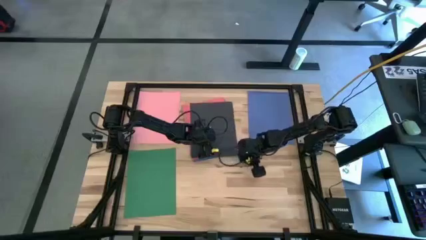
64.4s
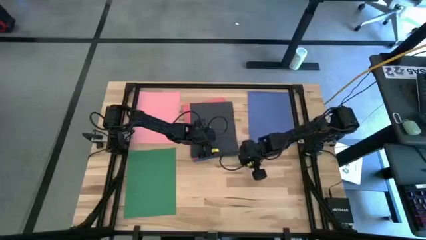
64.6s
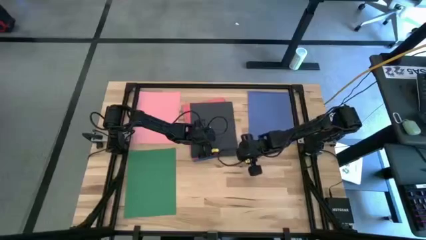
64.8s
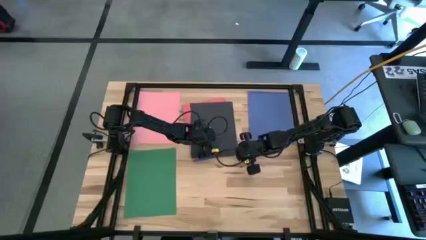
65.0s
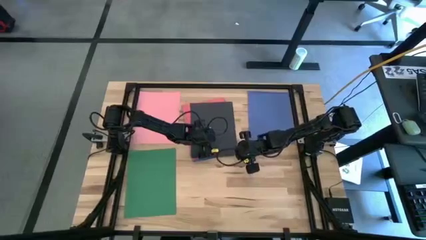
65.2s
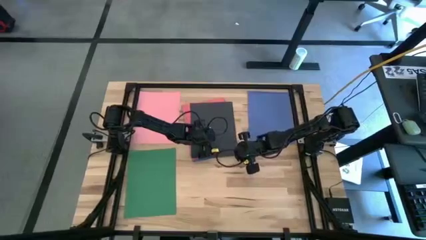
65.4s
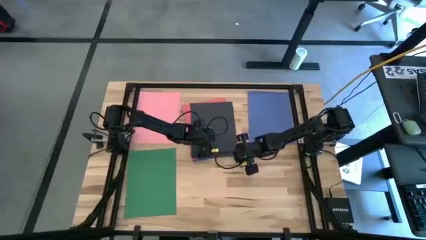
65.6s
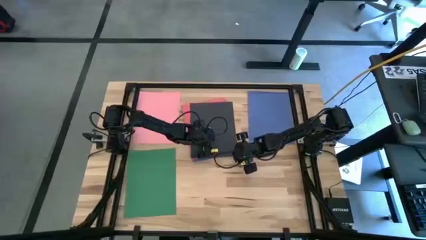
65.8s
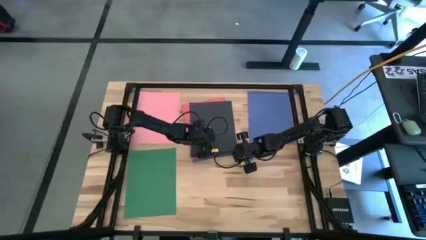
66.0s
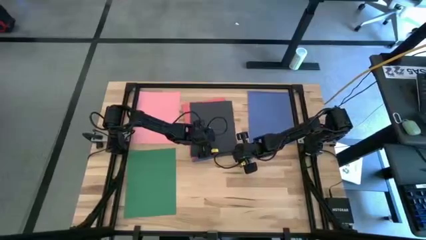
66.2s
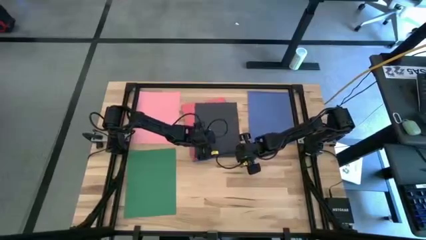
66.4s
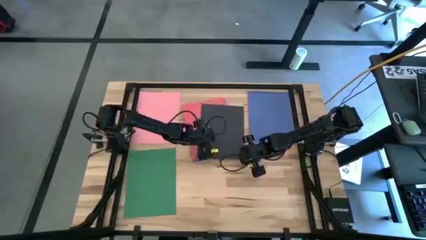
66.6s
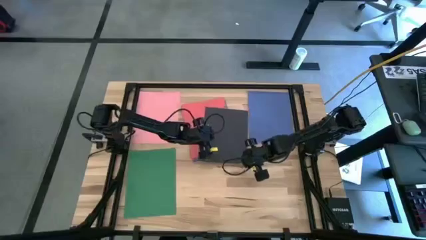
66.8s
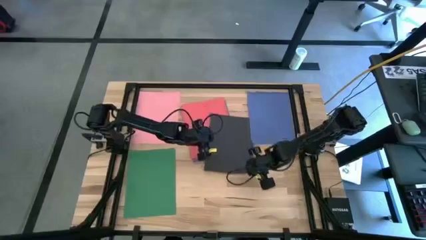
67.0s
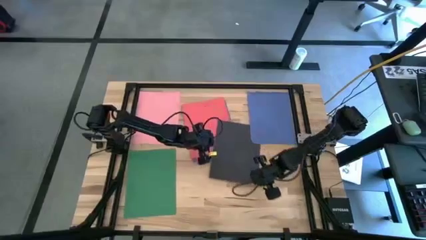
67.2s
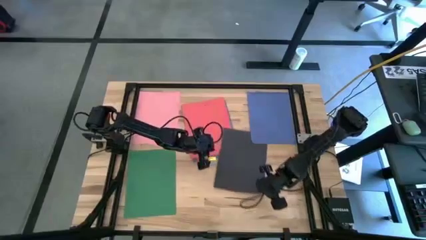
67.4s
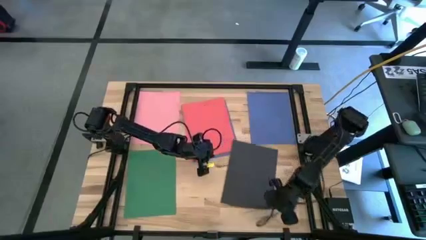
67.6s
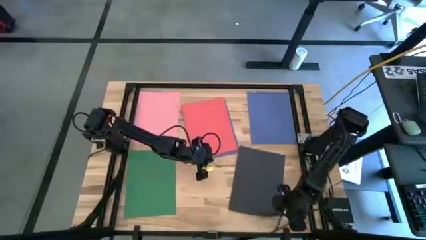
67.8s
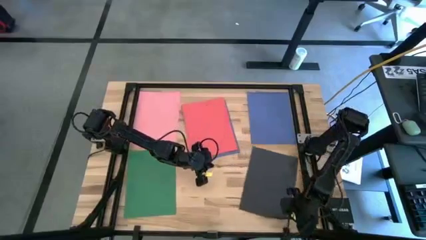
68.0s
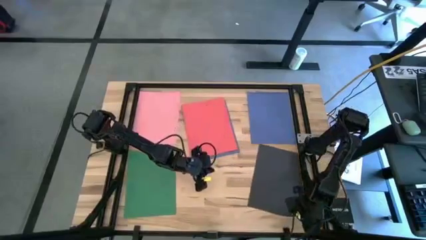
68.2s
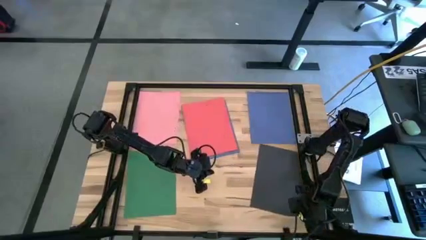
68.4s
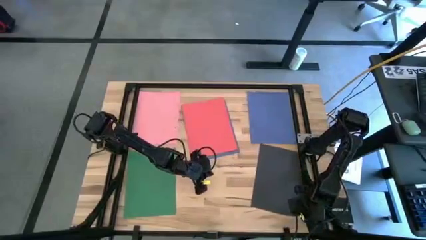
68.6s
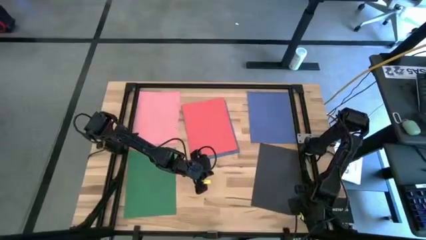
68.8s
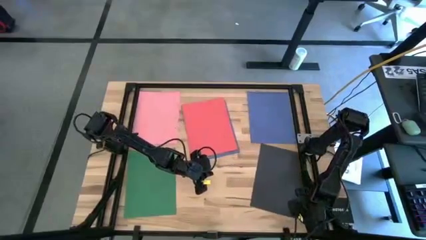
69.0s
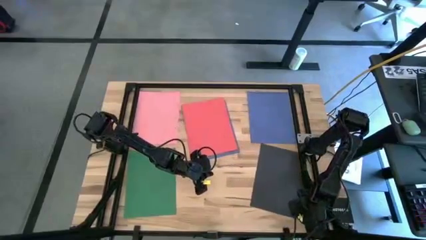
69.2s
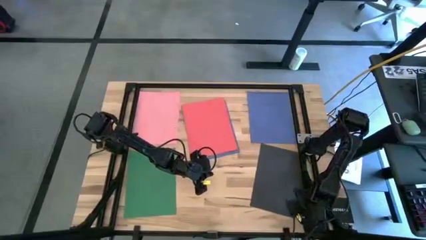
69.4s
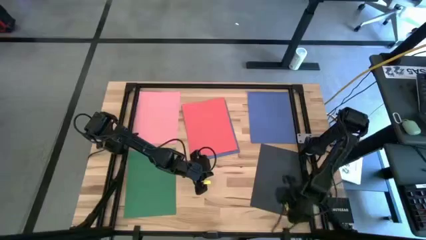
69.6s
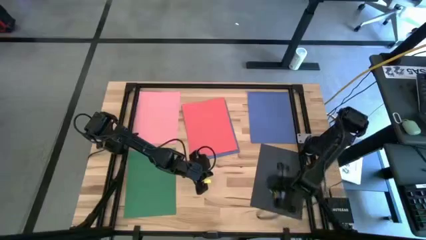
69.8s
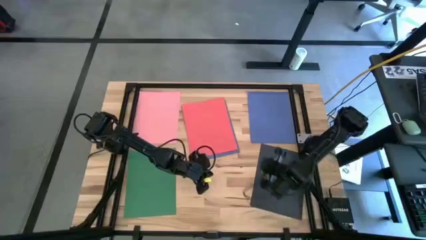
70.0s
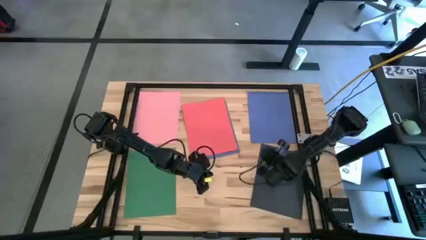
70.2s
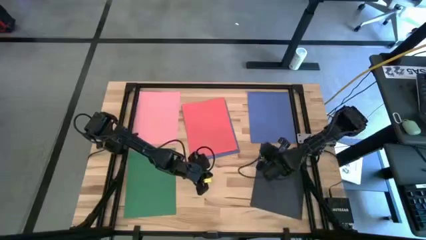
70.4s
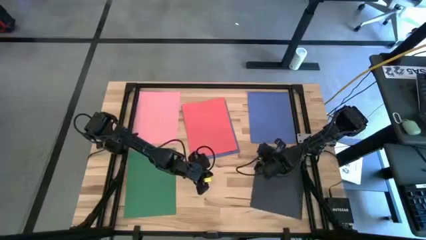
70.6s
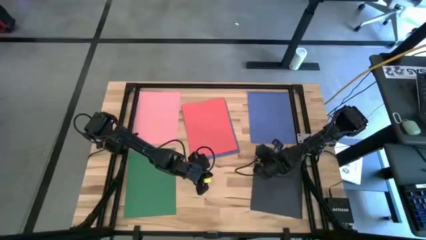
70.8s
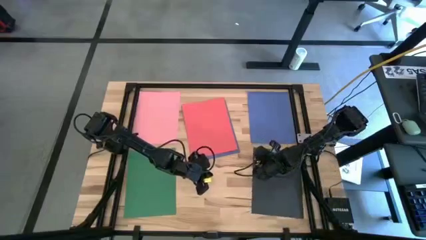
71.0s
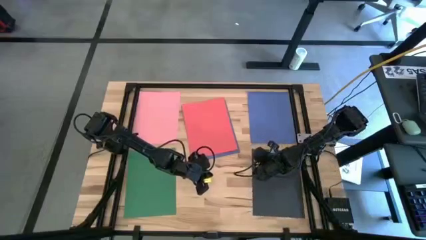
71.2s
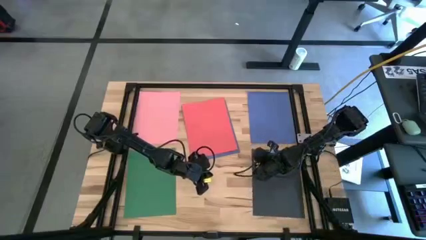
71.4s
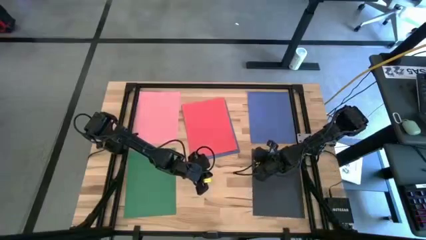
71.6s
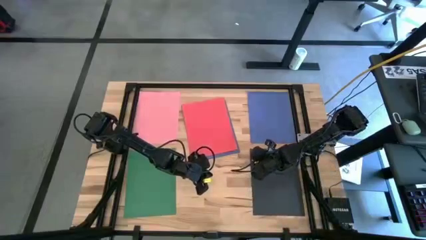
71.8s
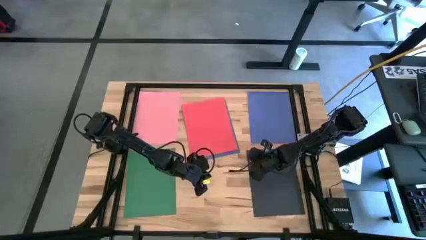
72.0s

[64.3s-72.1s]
Task: Organize paper
Move the black paper to the bottom right of the table

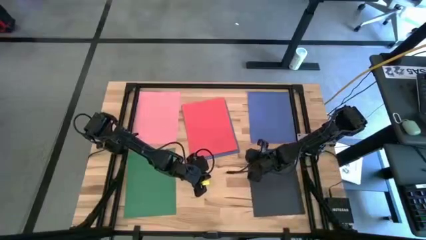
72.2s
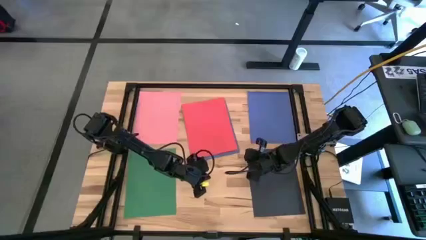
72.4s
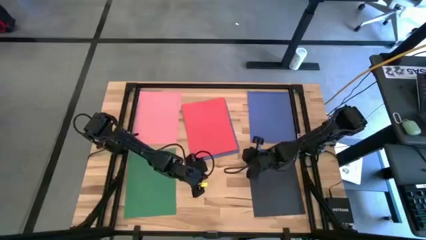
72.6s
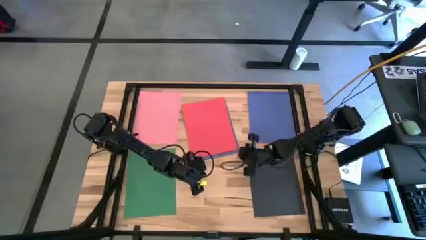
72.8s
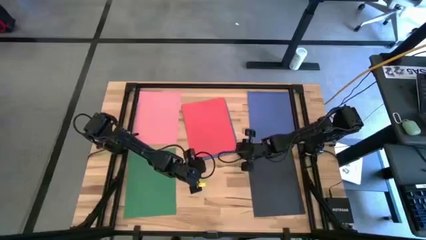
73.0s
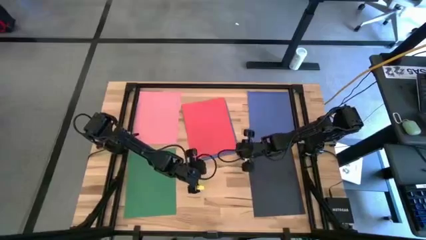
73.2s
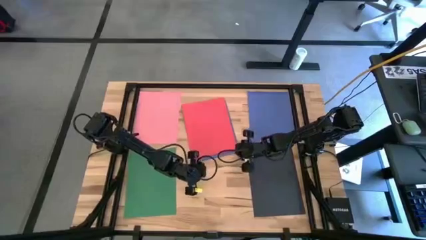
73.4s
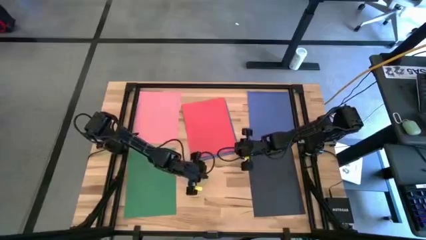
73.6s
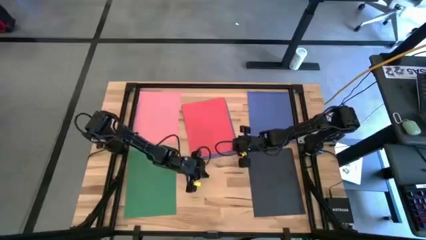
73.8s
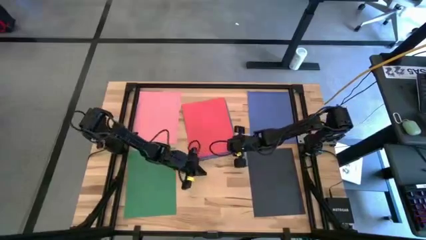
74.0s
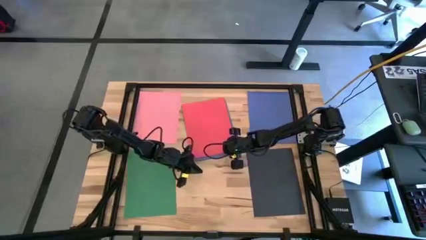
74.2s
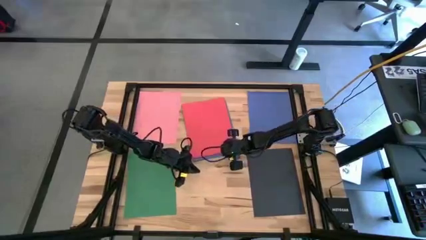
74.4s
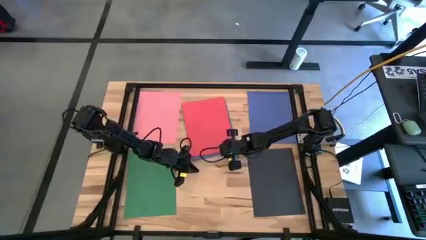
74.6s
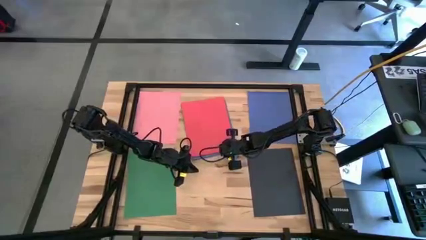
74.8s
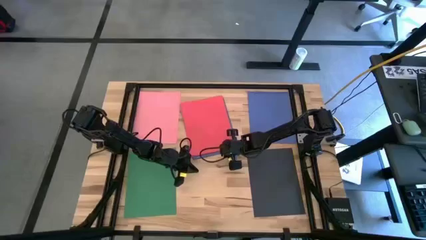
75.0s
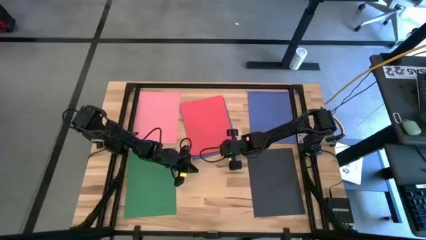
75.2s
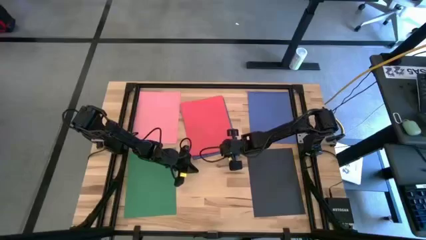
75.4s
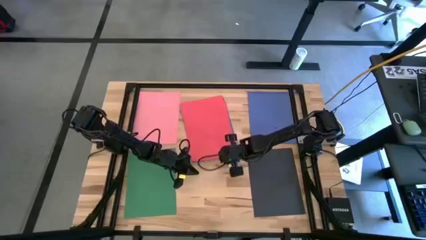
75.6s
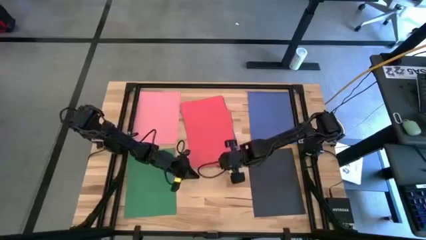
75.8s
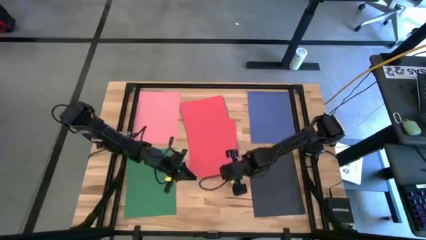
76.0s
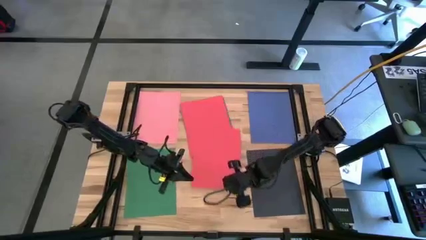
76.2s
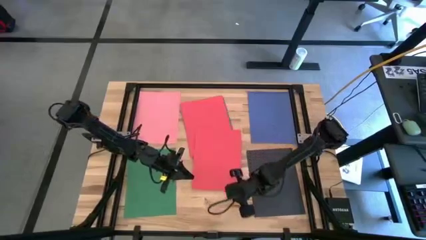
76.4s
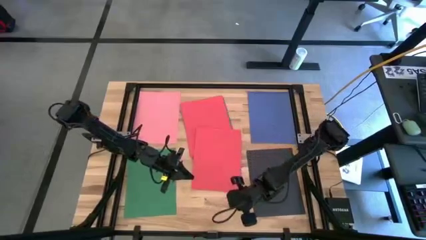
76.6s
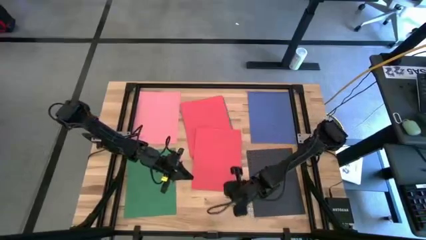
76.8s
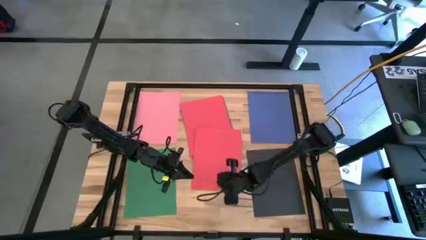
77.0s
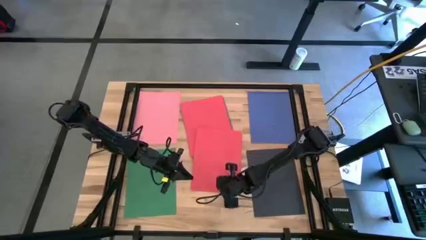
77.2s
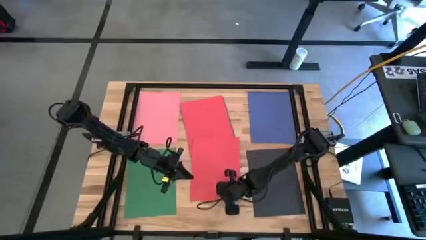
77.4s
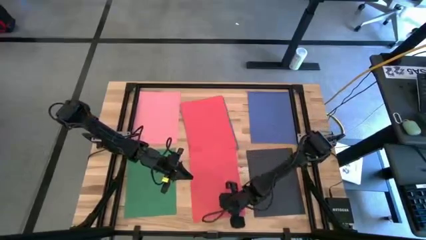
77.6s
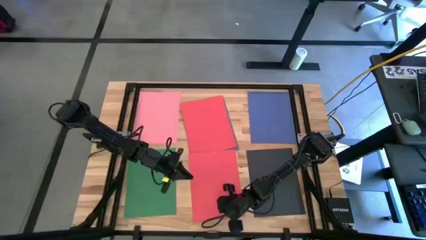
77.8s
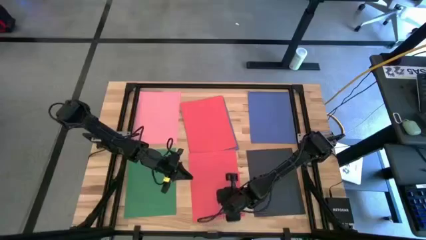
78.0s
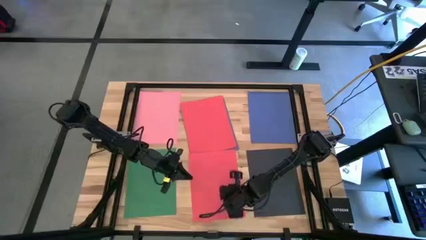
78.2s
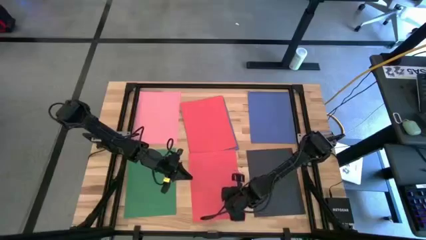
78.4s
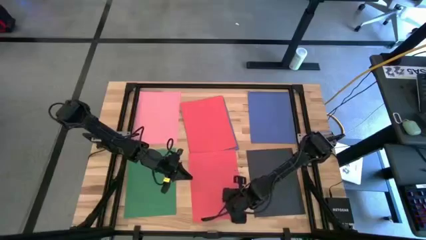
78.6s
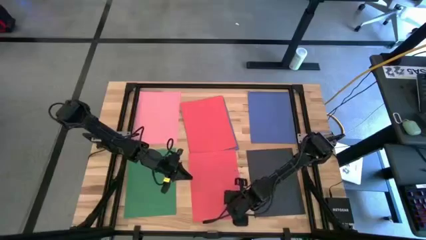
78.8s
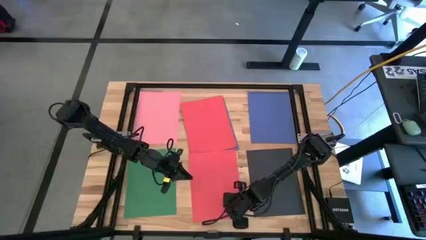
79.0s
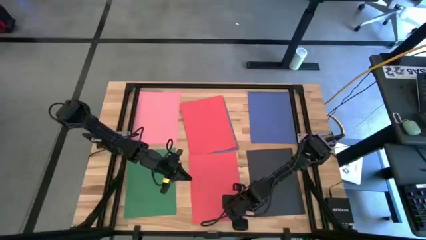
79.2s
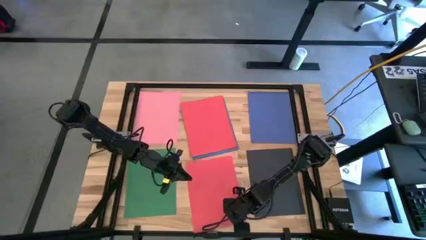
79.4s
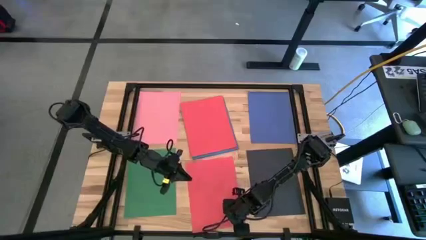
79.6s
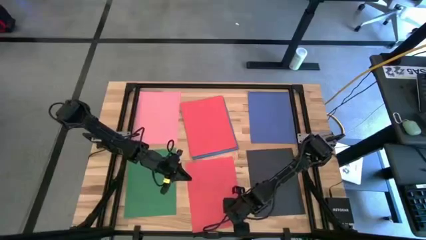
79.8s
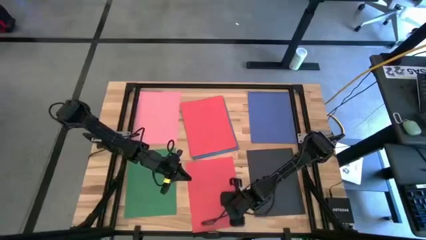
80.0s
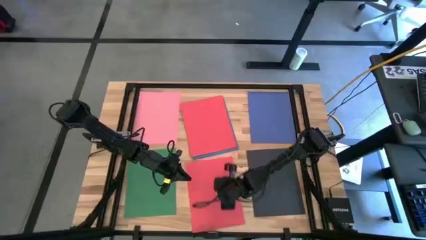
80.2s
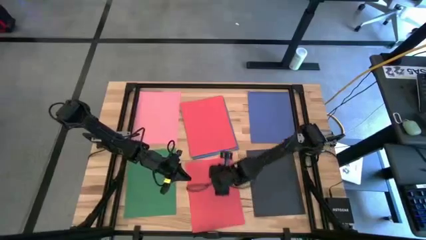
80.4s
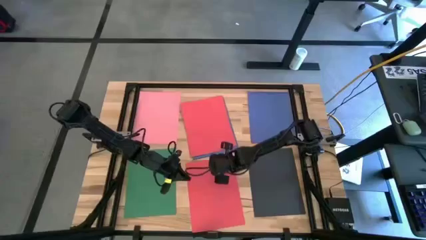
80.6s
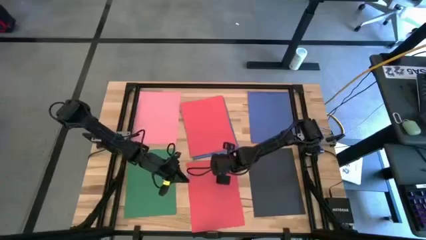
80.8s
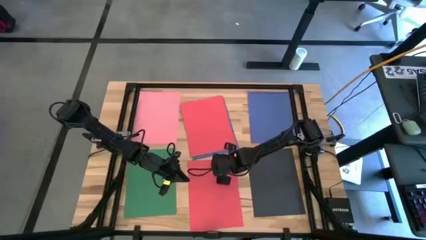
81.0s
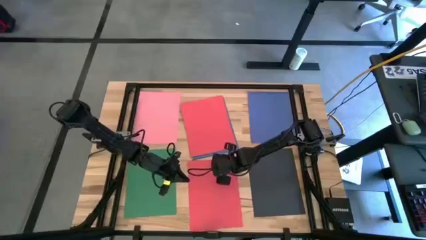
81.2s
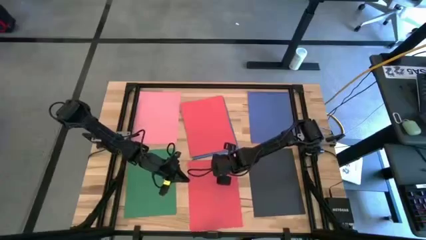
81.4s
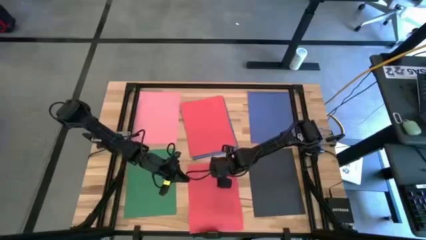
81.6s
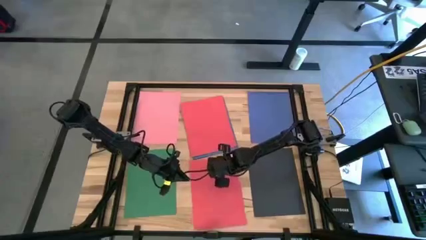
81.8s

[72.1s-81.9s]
Move the red paper to the bottom center of the table
